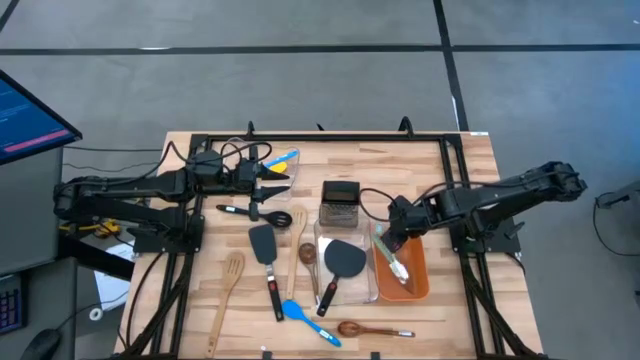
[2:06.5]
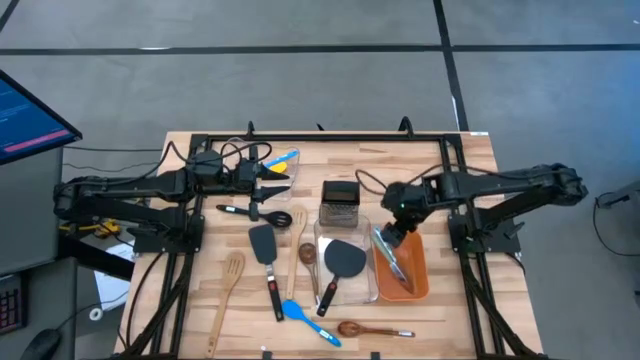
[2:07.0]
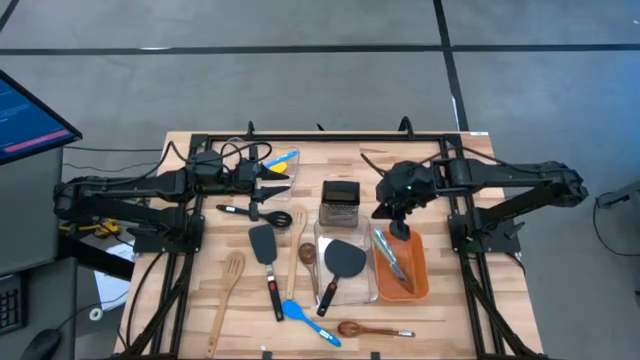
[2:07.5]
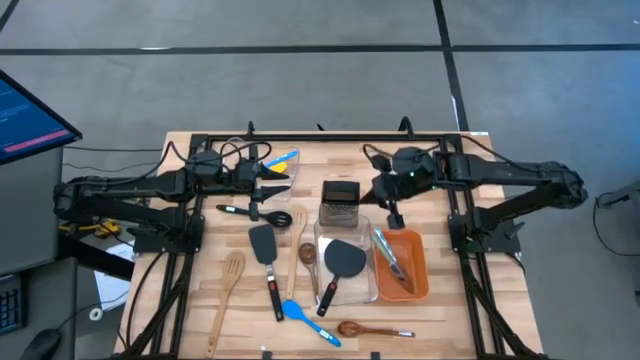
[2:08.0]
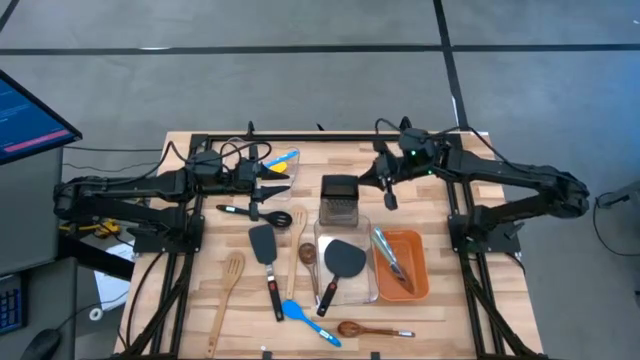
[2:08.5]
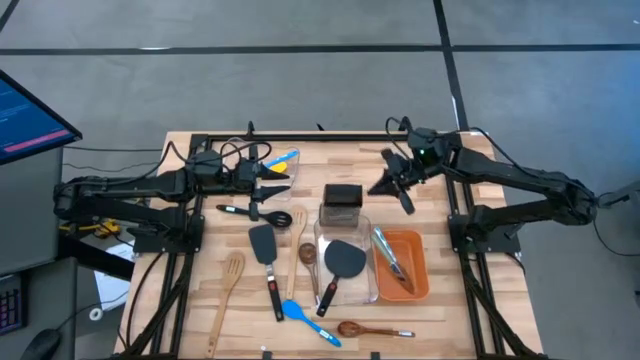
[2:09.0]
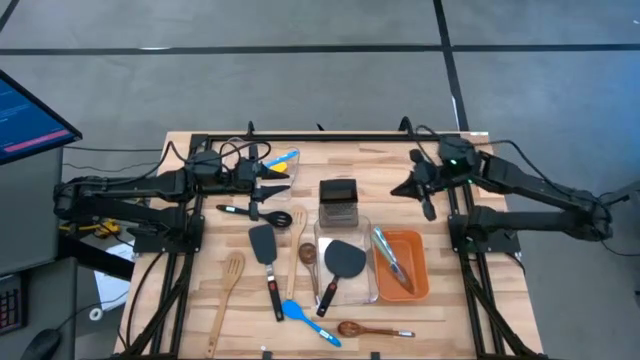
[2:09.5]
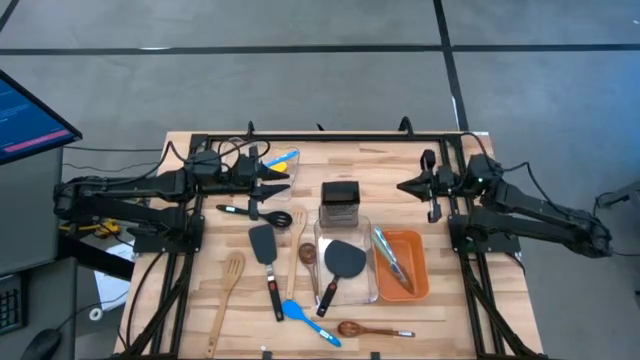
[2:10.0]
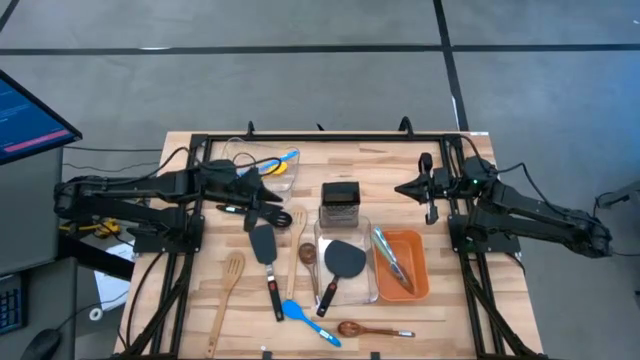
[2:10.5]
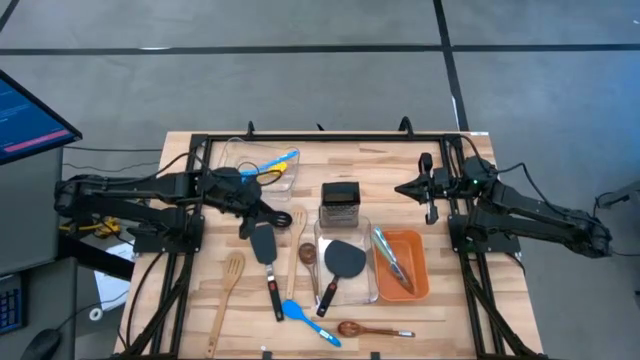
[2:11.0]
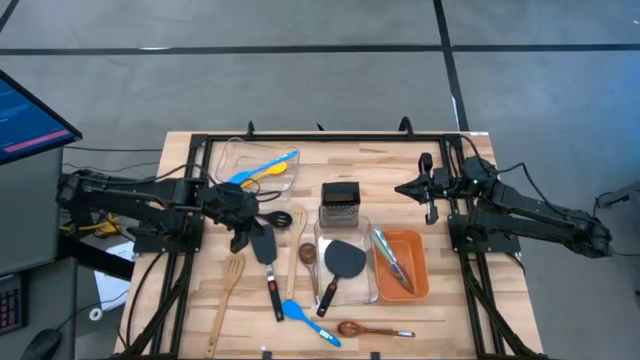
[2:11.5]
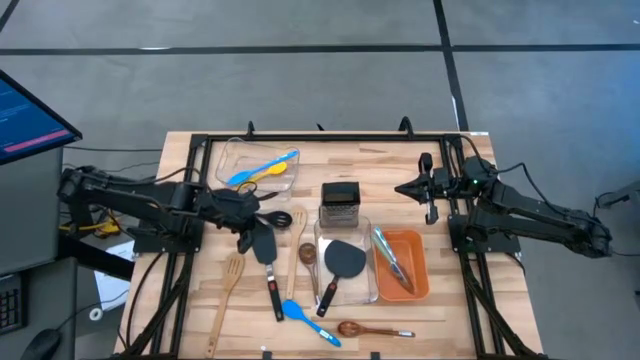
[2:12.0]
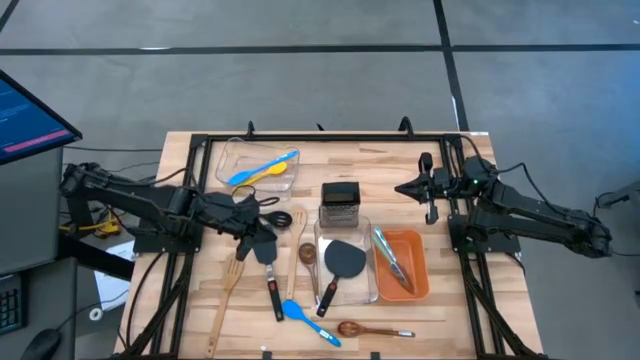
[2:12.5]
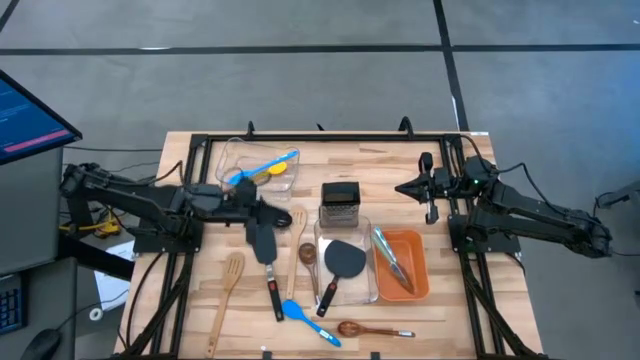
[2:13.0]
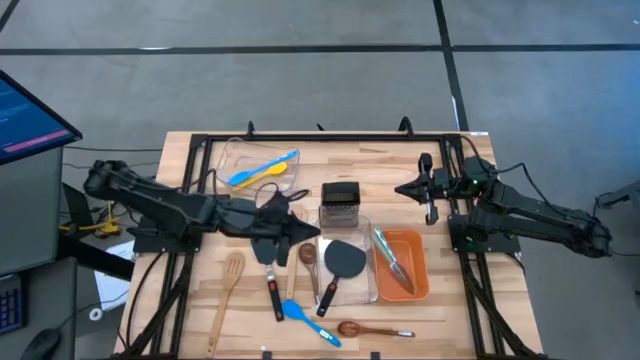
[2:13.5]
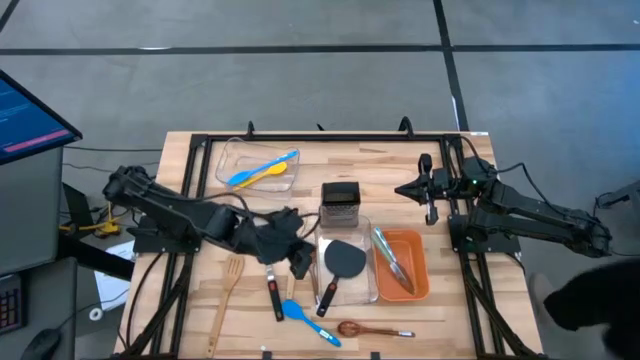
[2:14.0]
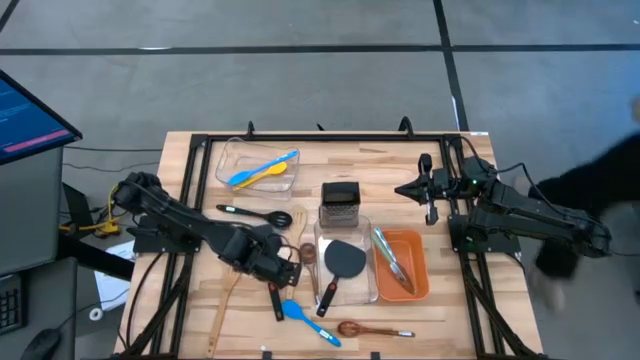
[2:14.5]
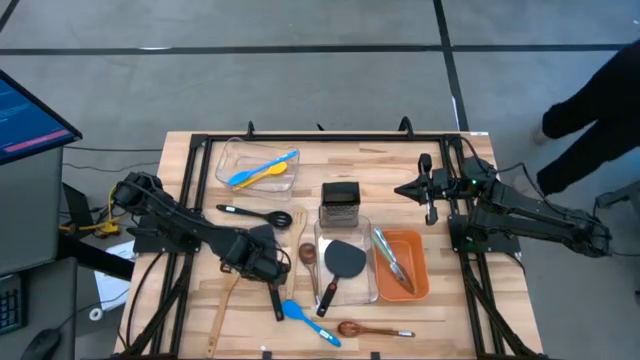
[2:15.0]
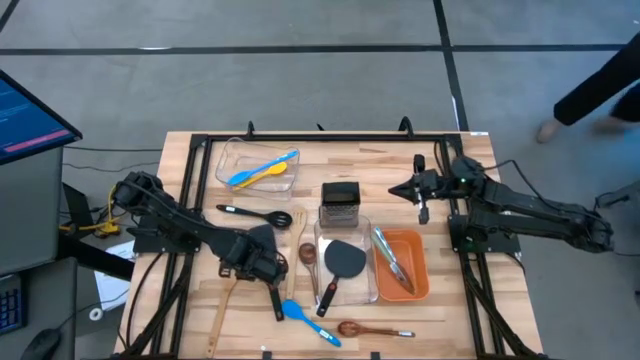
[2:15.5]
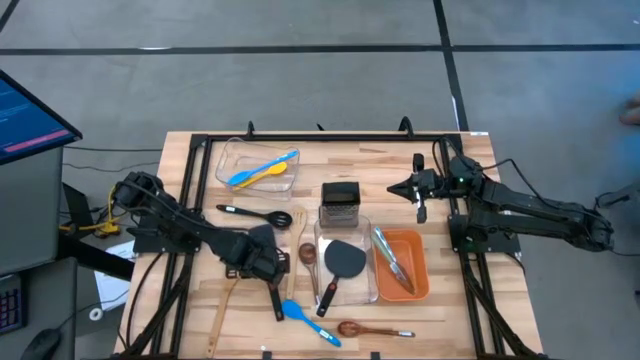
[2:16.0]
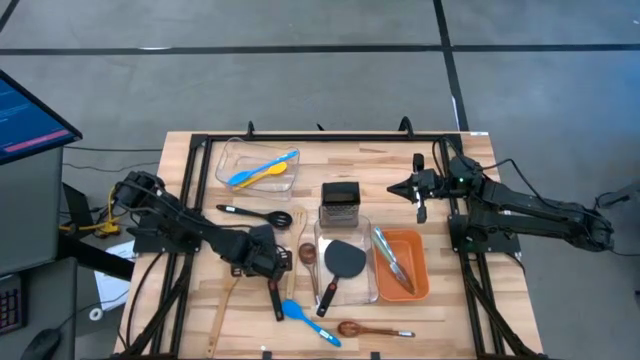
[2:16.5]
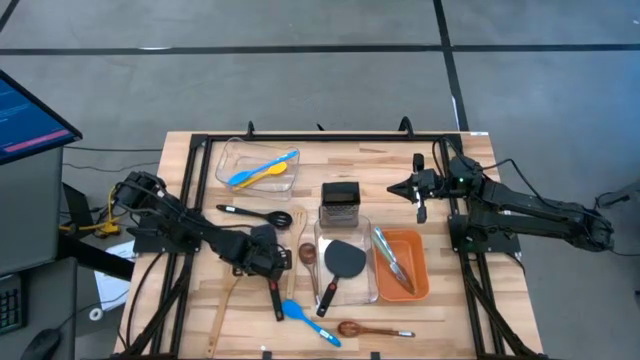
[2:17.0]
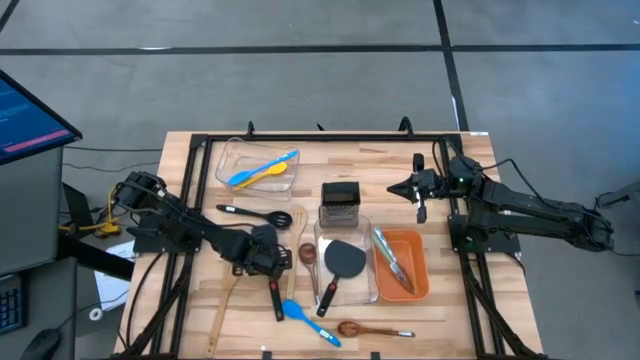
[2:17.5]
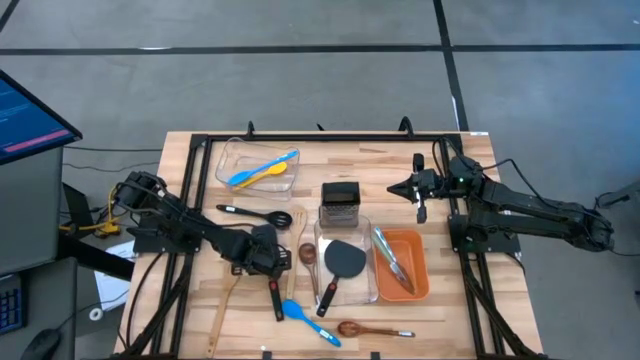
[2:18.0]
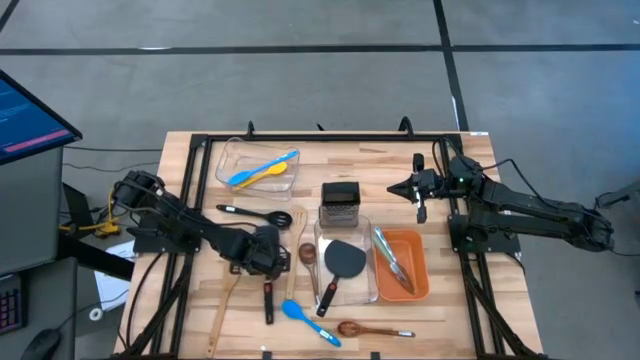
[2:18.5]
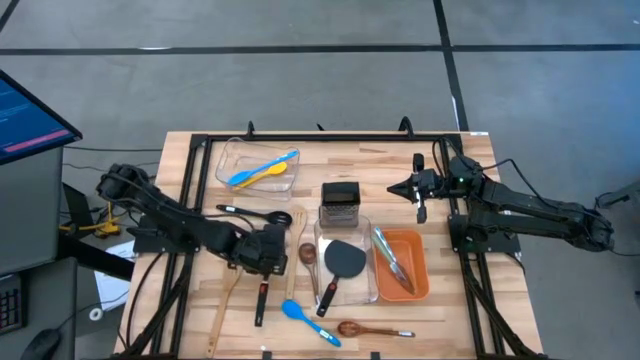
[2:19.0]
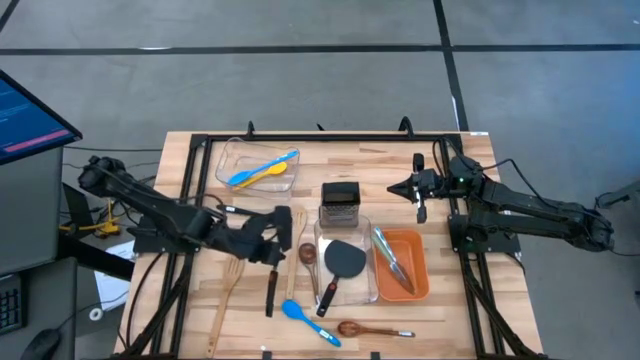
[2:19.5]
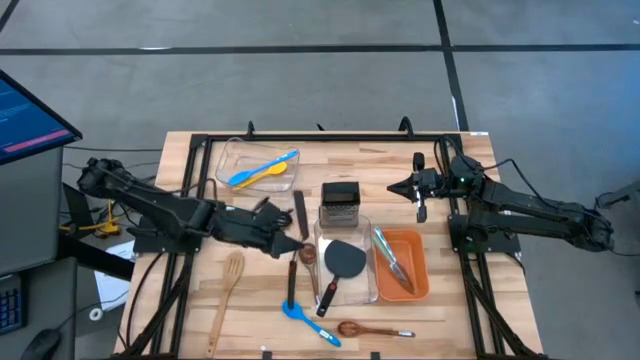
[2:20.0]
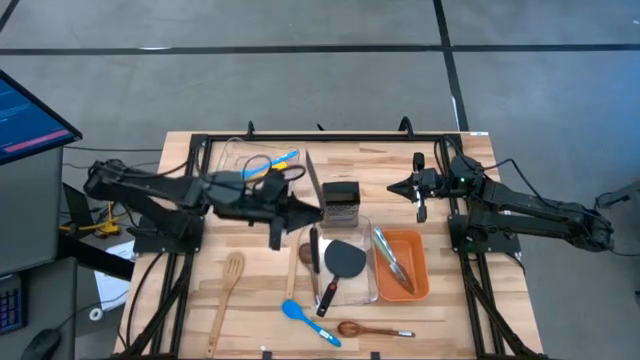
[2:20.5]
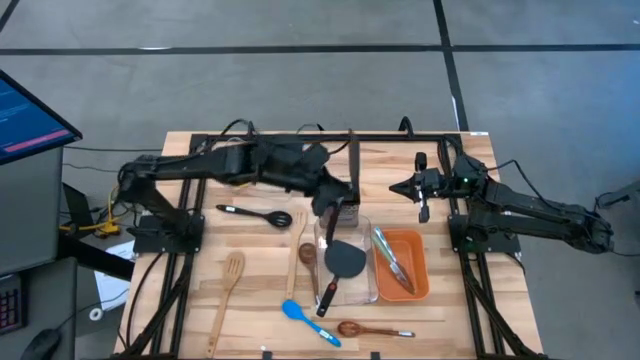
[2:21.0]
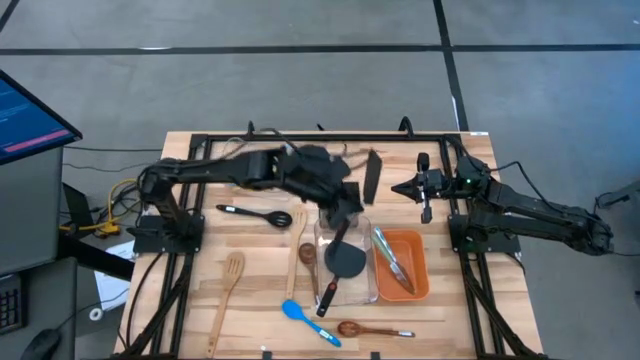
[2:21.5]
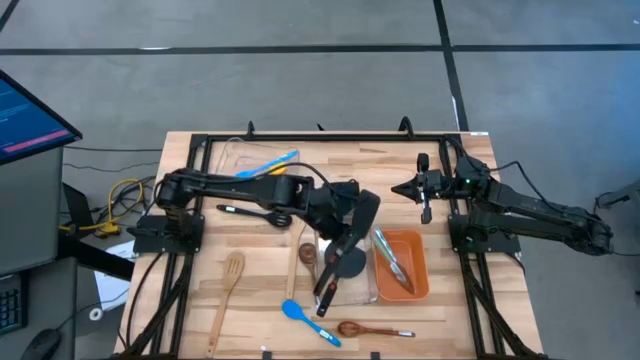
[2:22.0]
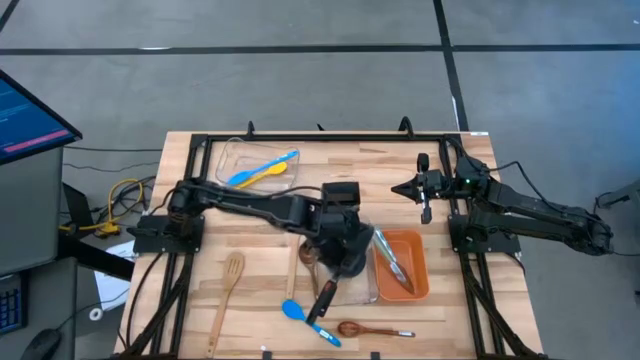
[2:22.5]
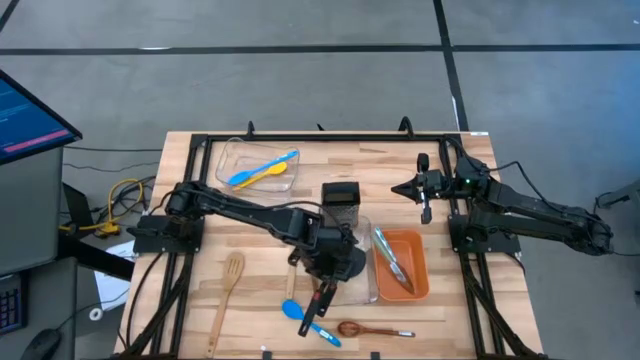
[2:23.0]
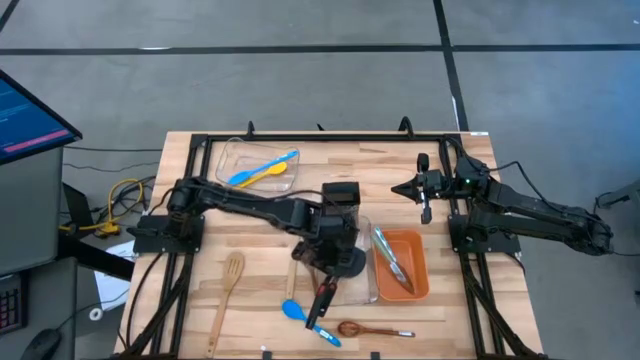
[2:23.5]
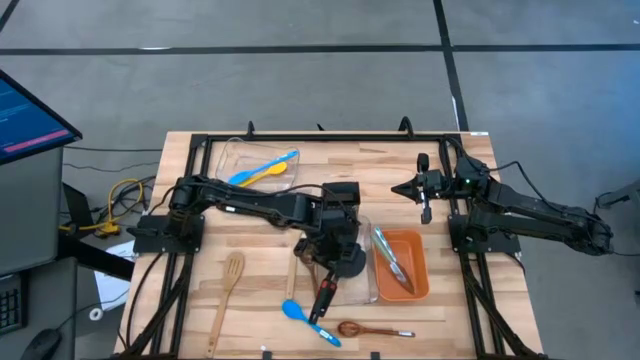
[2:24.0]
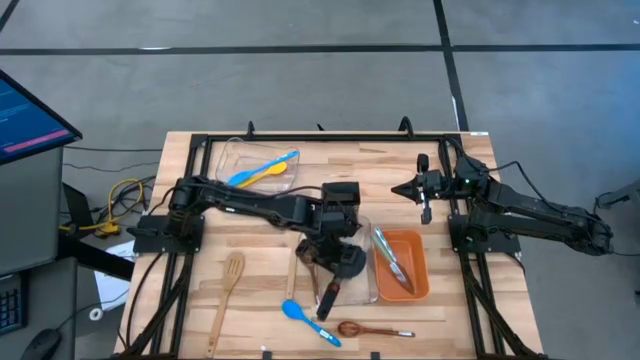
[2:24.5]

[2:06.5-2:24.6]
Task: Pick & Place Kitchen Items
Put the black spatula into the bottom transparent bin

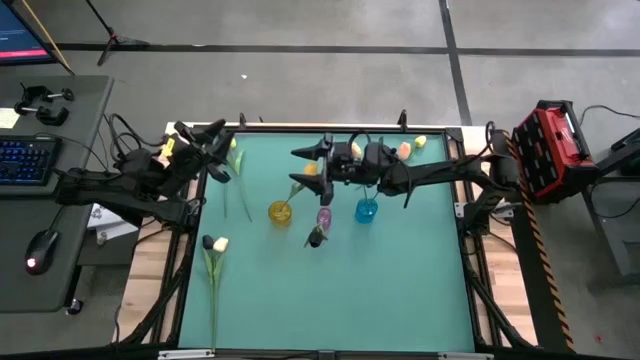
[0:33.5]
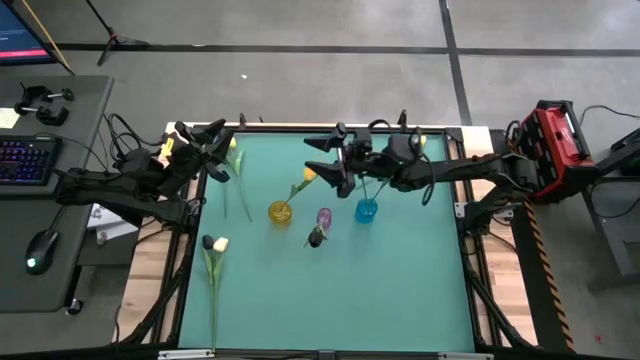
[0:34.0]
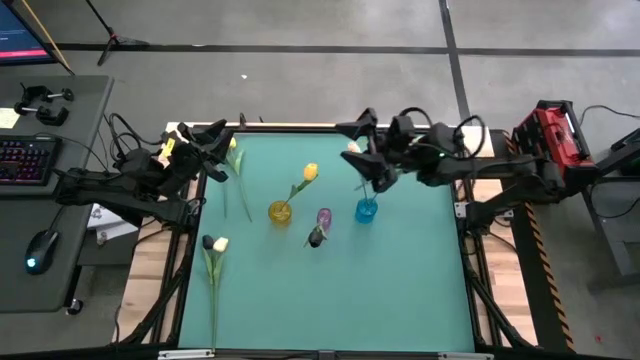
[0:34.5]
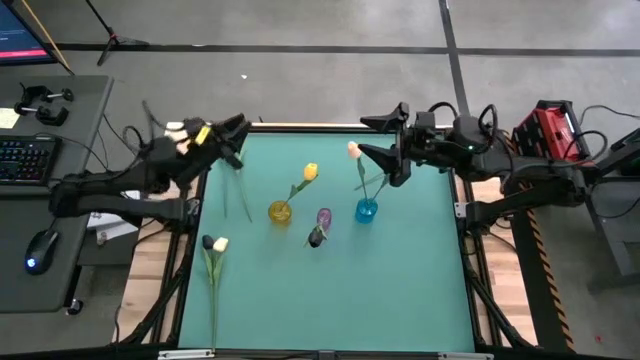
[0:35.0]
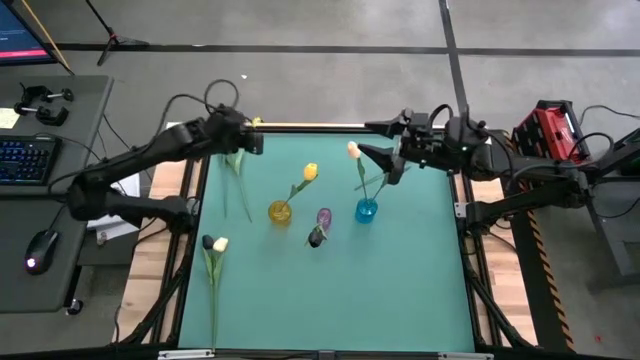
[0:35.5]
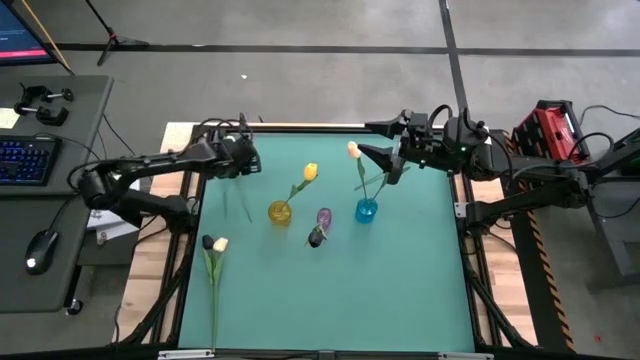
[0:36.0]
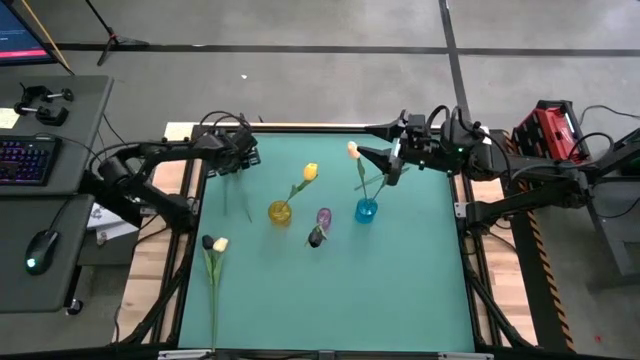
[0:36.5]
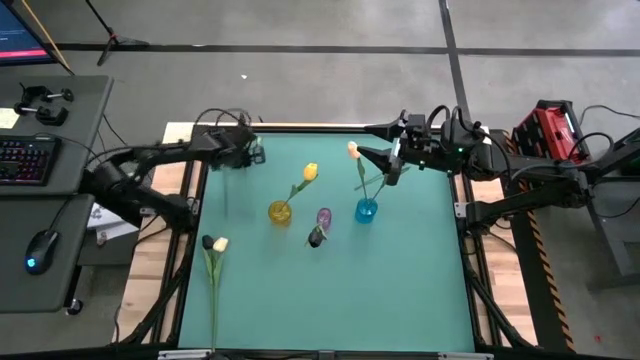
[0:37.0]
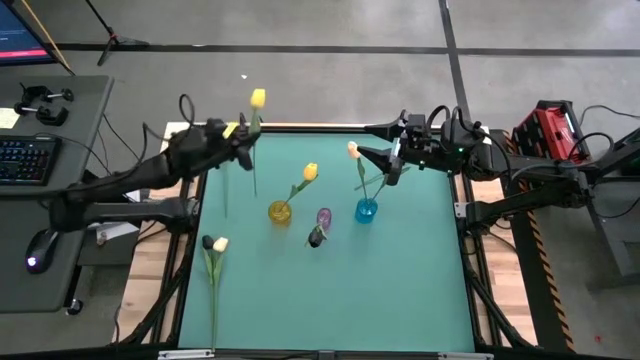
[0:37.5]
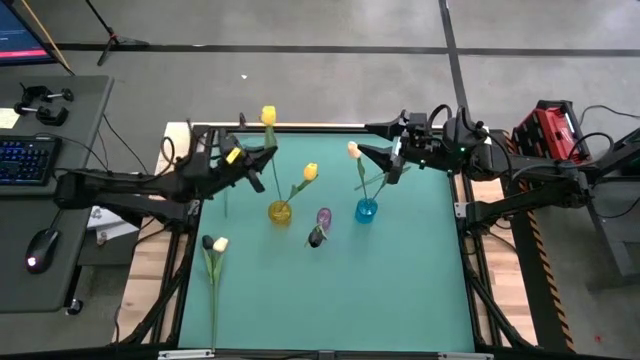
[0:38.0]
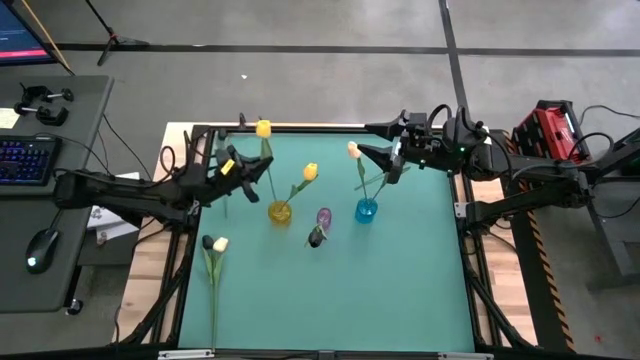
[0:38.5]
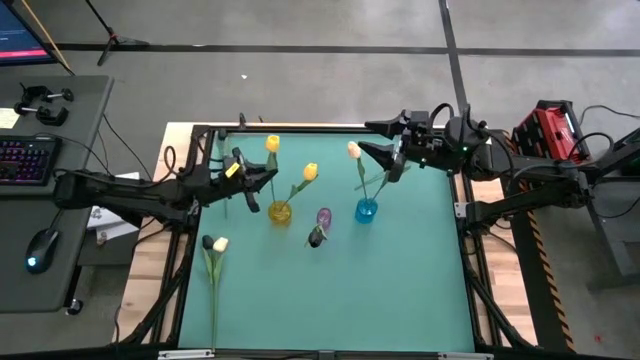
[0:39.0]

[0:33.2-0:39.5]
Task: Sort flowers into vase by color
Put the left yellow tulip into the yellow flower vase
